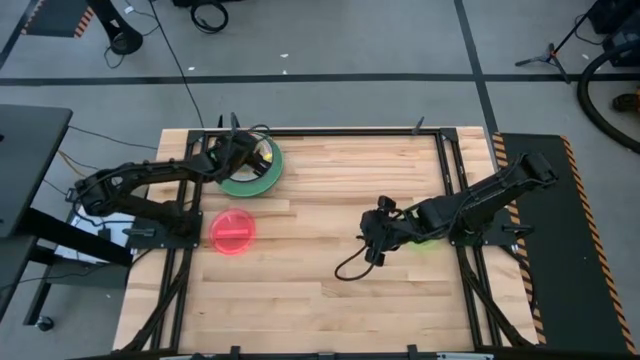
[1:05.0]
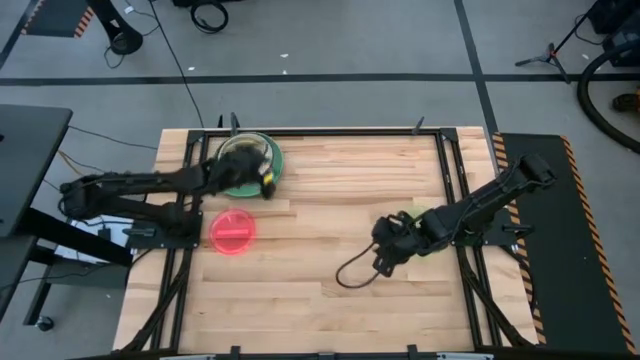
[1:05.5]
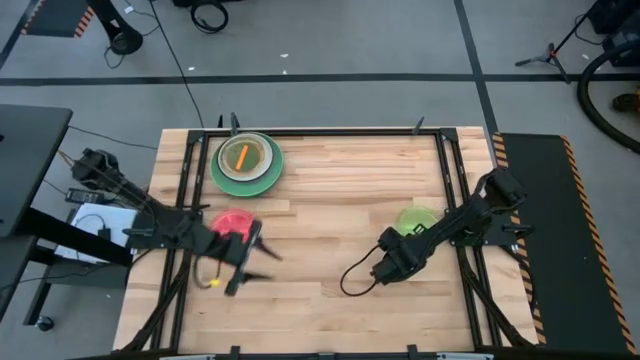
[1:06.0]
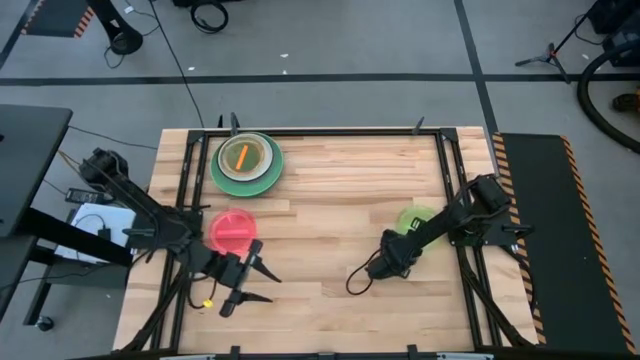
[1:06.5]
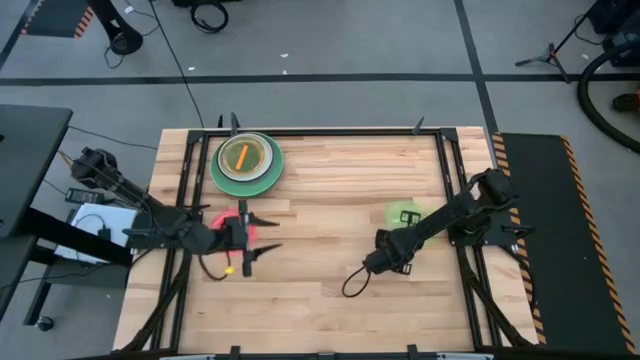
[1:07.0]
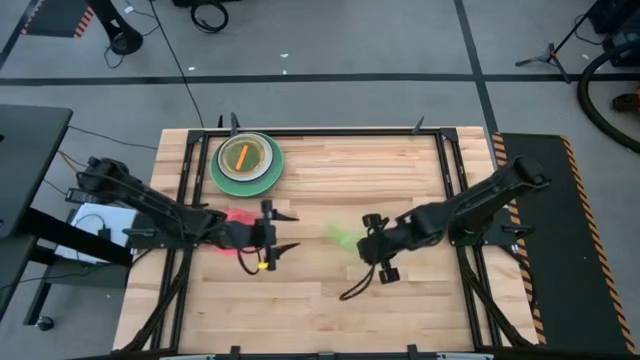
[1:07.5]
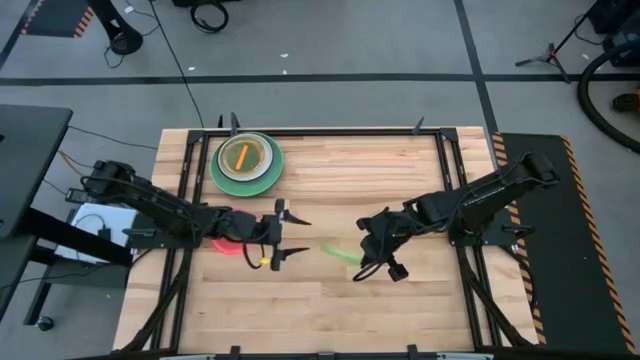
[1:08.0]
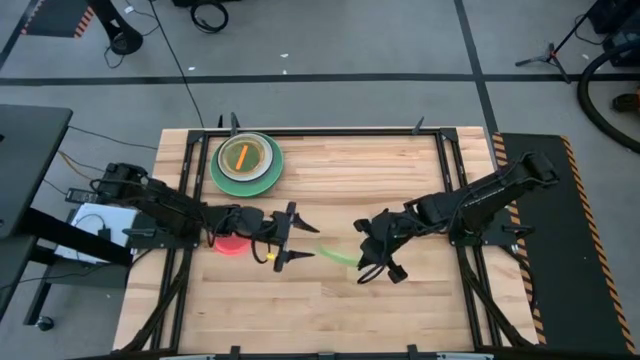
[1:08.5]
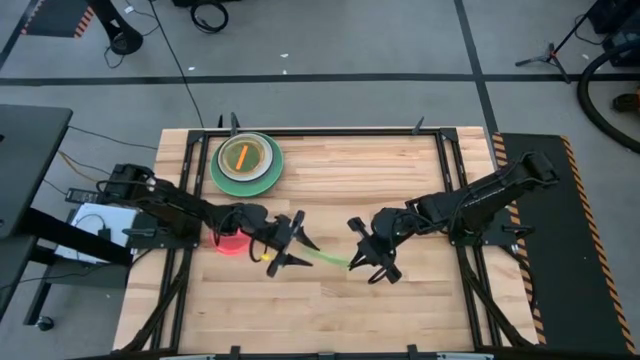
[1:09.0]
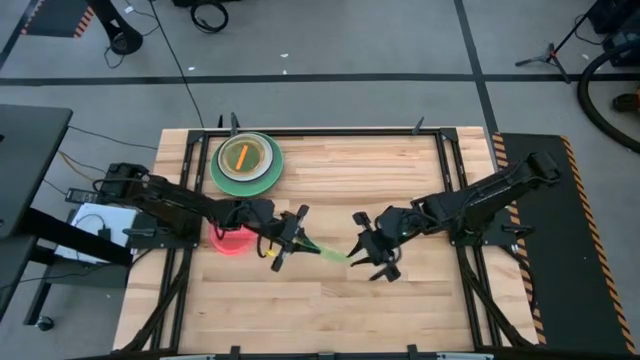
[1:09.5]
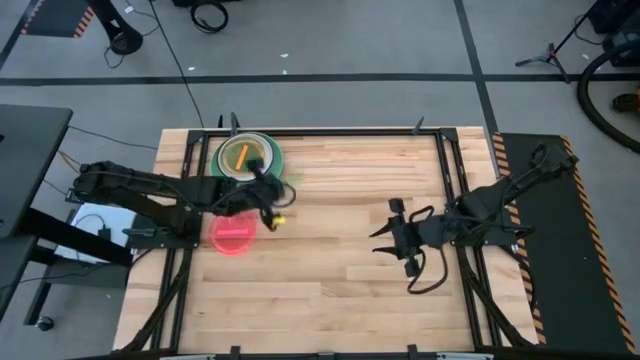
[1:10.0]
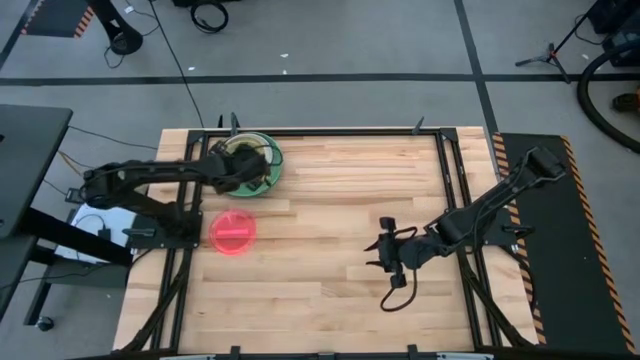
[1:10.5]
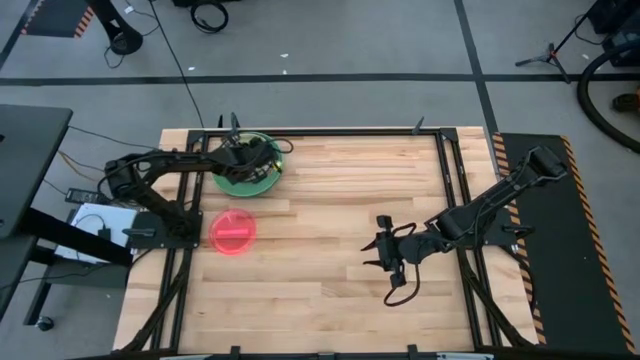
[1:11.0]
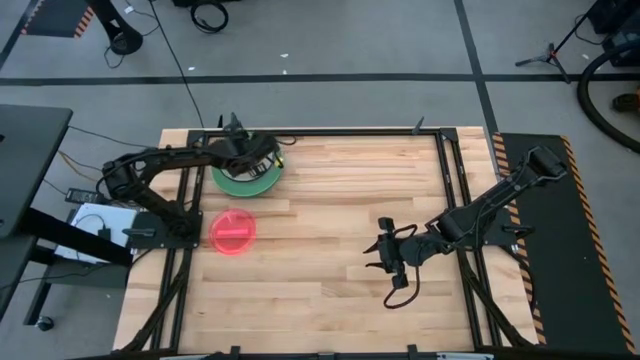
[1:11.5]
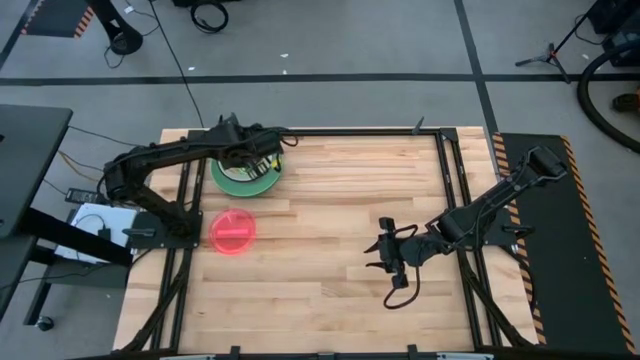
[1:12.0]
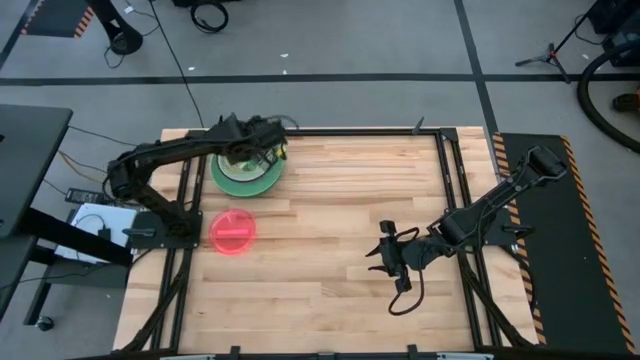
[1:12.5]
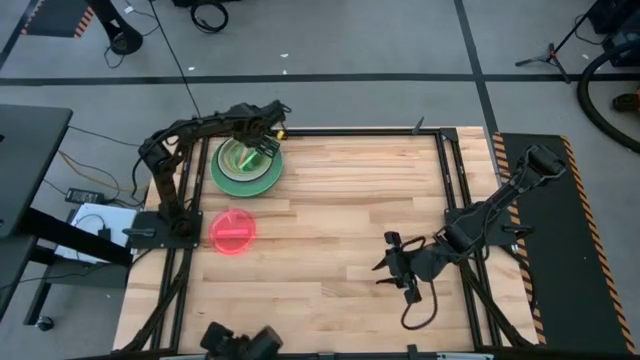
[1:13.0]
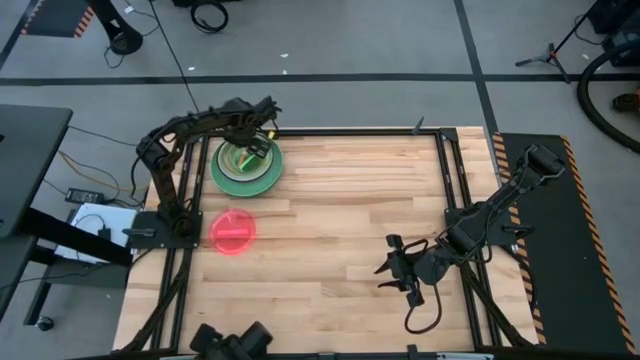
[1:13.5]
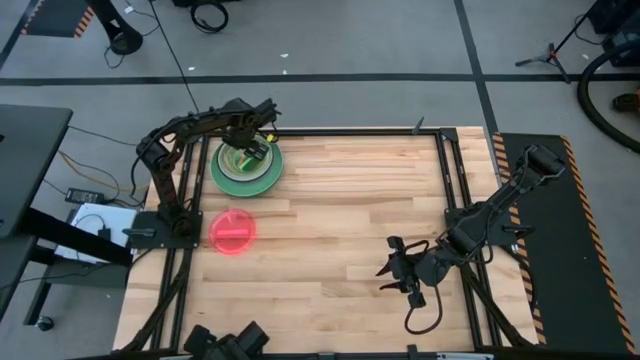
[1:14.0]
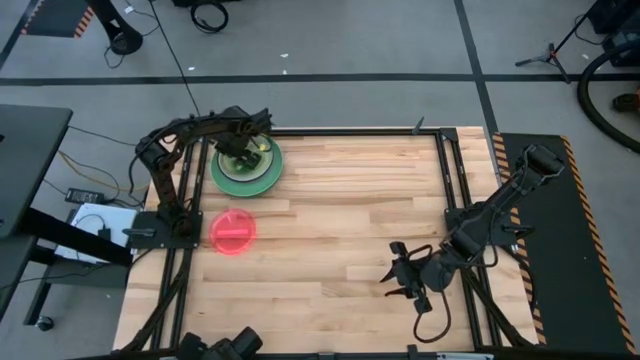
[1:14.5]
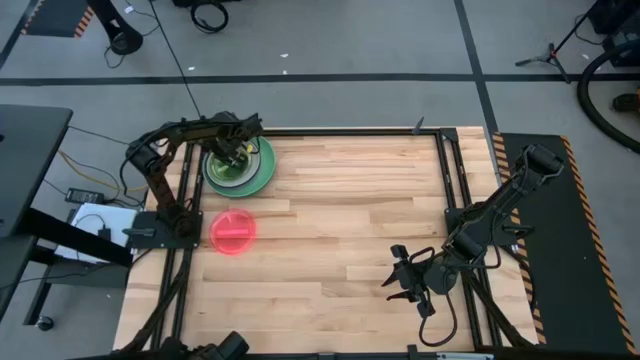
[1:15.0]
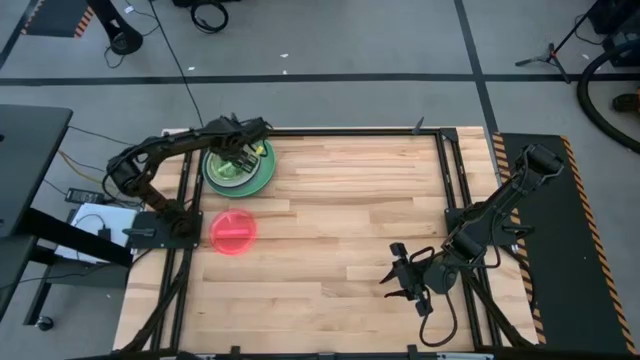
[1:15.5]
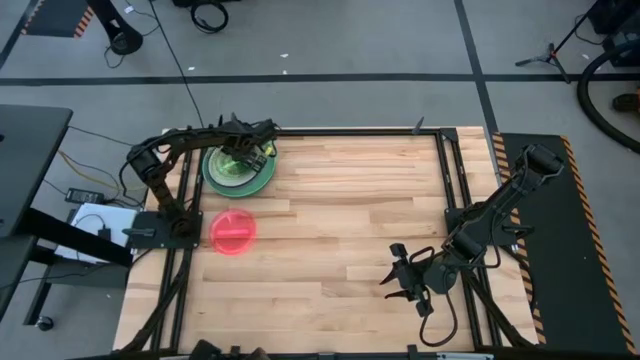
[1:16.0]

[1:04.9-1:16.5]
Task: Stack plastic plates
Stack the light green plate on top of the orange plate

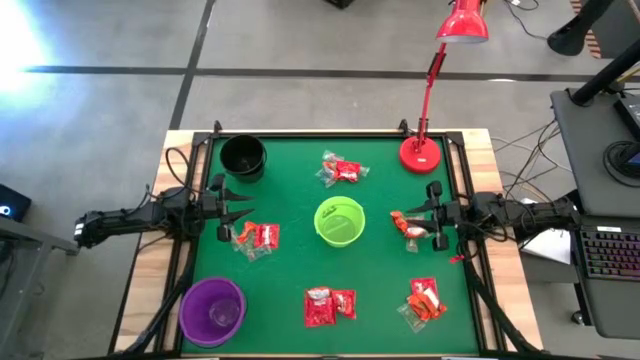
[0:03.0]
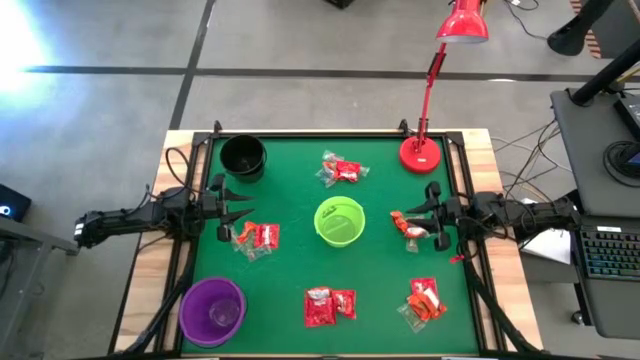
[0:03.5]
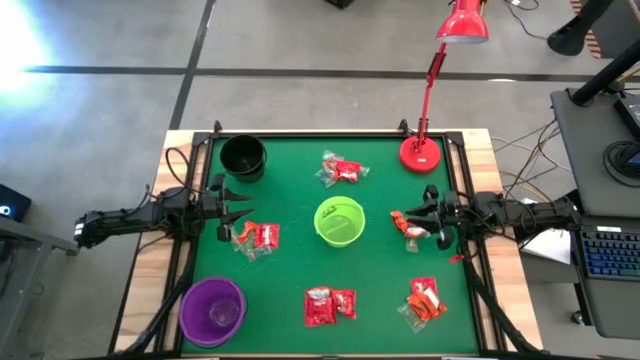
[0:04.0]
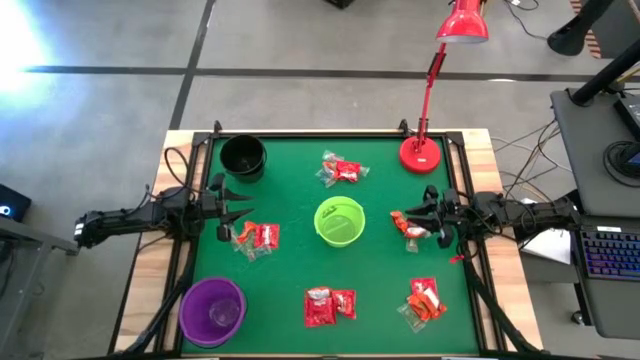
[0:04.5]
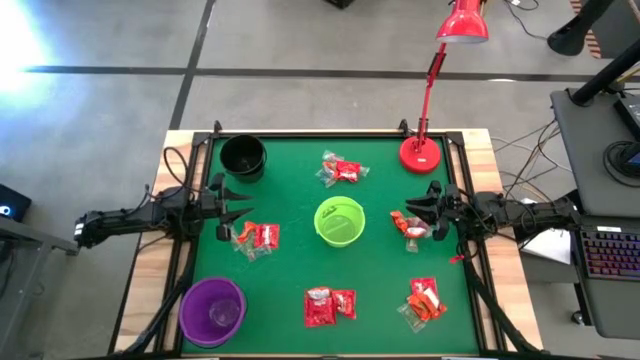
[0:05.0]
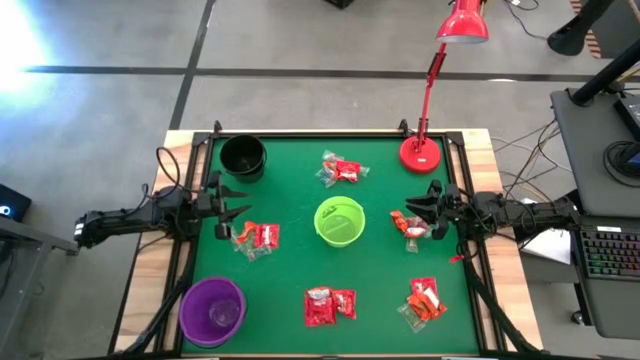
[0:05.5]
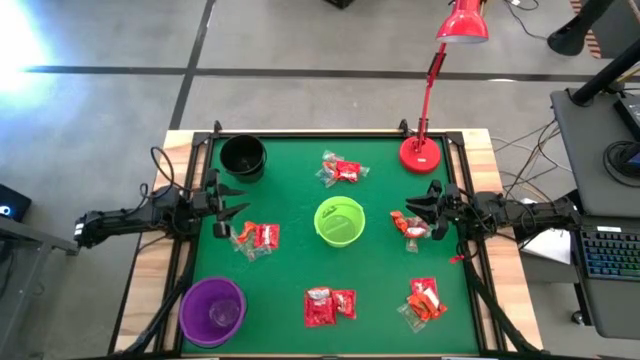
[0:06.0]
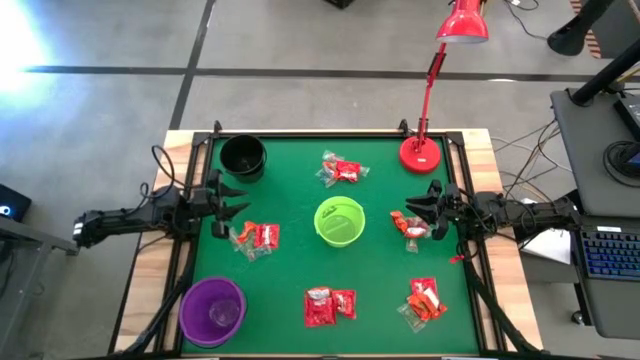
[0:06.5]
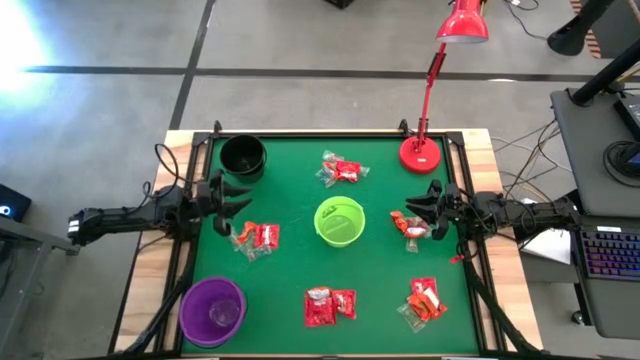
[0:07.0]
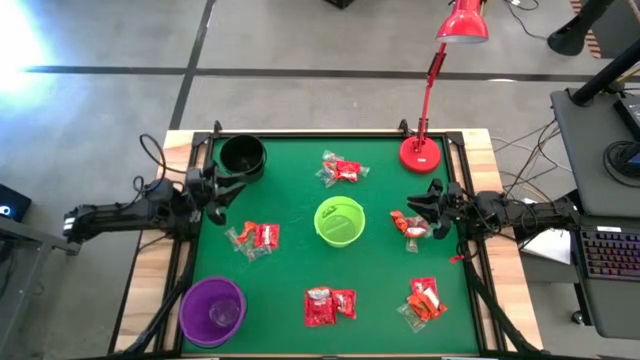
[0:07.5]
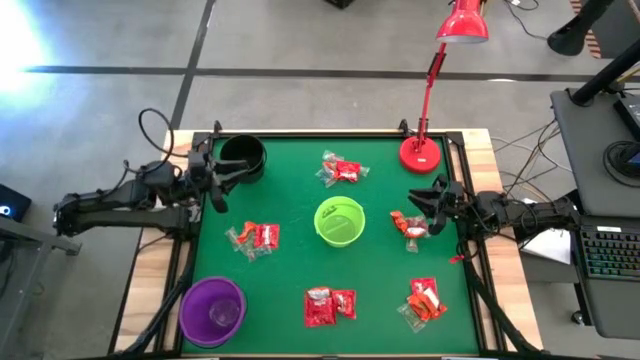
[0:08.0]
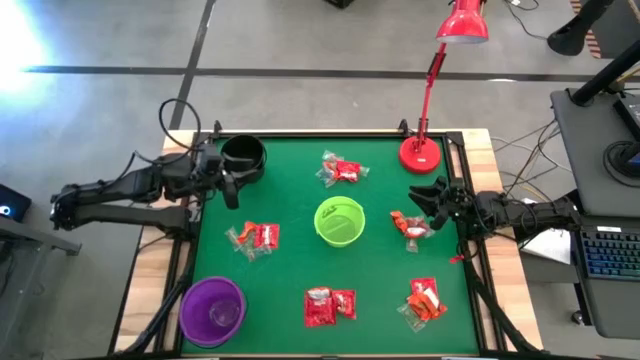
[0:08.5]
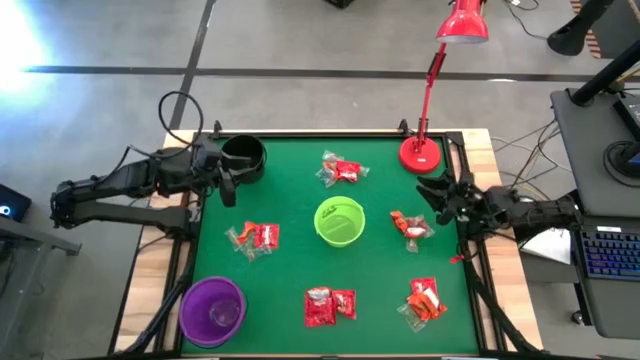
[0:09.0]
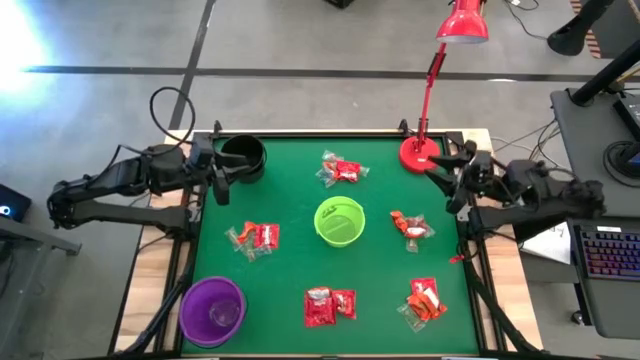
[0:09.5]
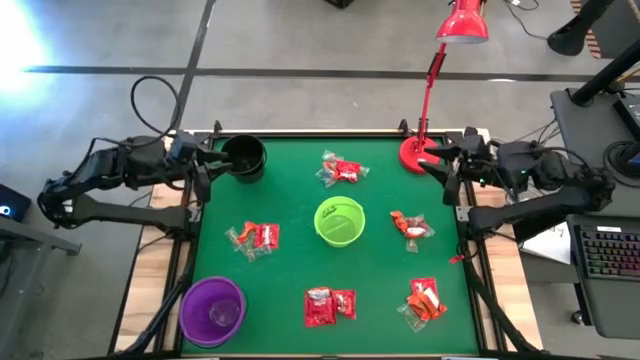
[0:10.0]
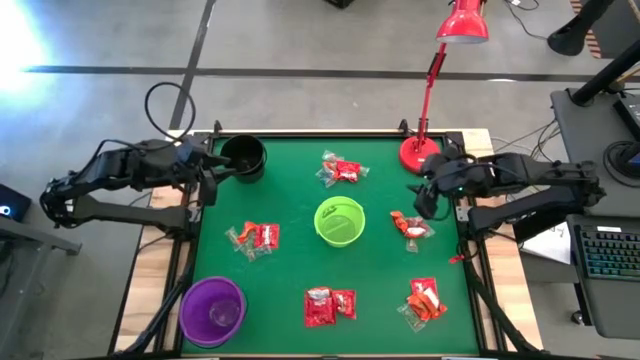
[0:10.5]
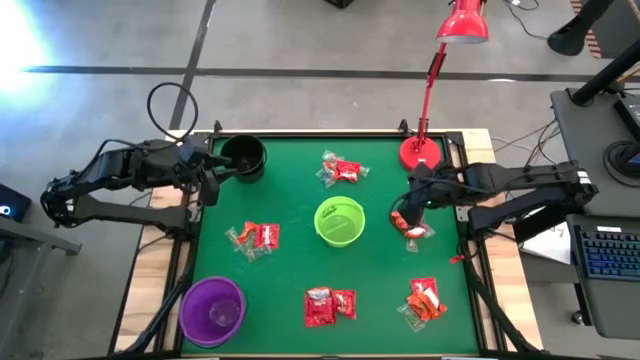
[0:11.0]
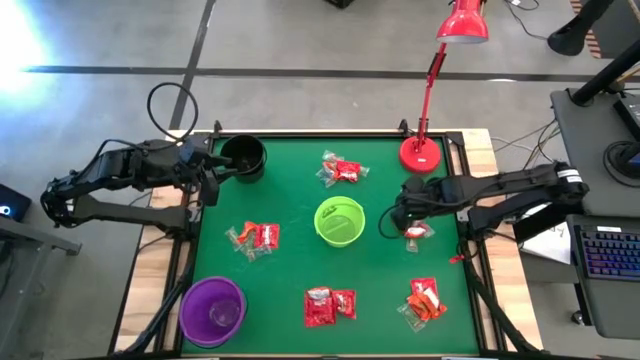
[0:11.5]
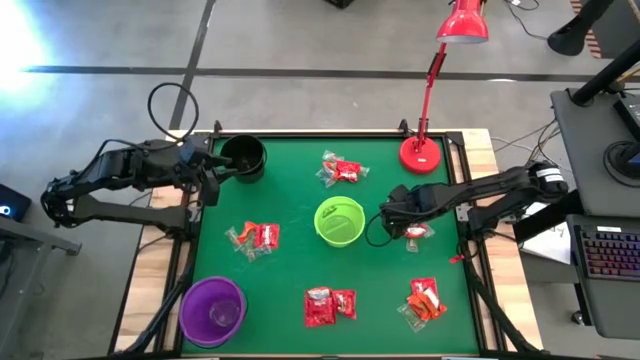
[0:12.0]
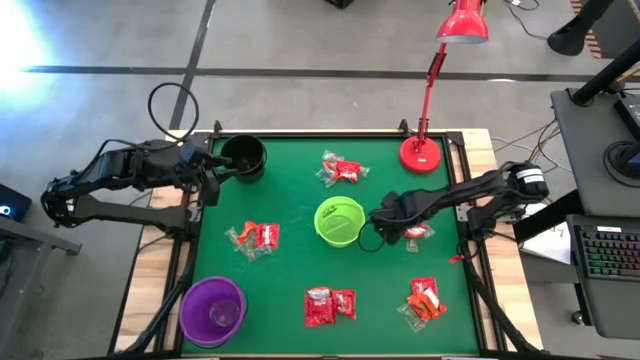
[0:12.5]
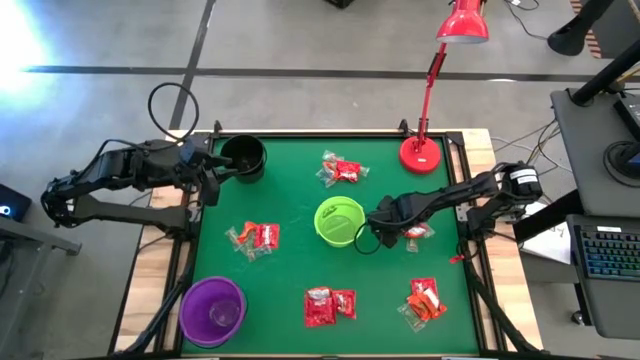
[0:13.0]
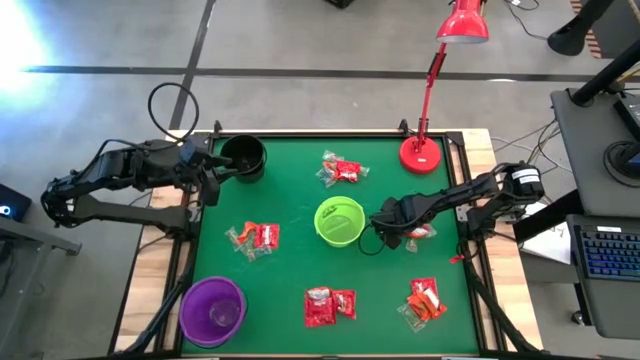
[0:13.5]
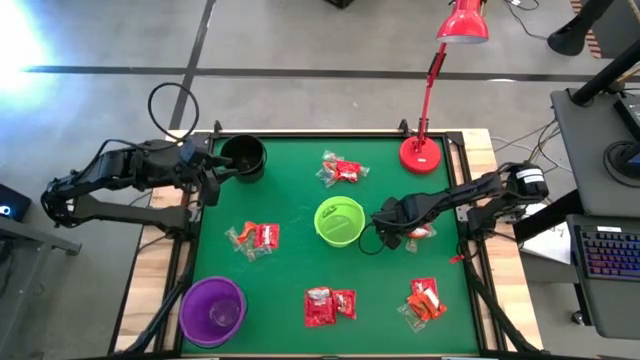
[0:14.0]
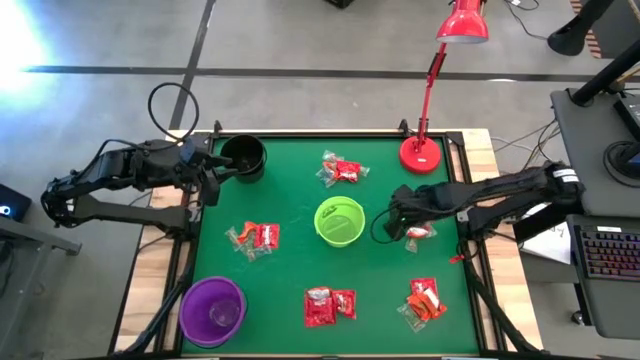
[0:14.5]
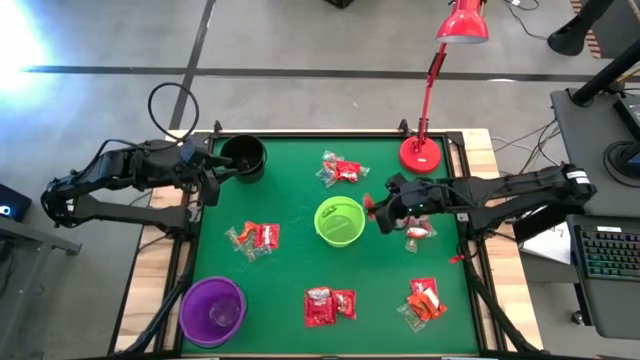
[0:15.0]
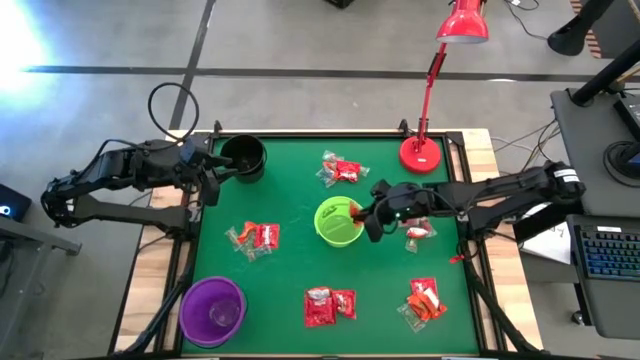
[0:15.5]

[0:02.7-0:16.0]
Task: Sort candy
Put the orange chocolate into the green bucket
